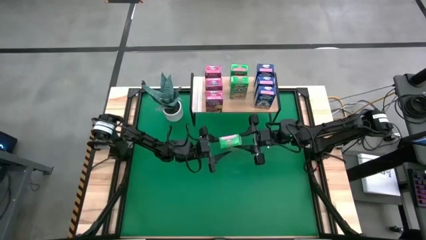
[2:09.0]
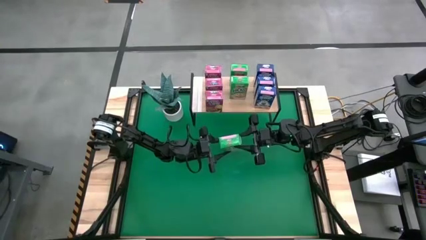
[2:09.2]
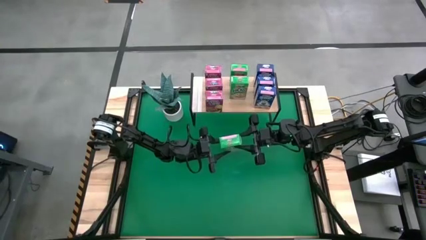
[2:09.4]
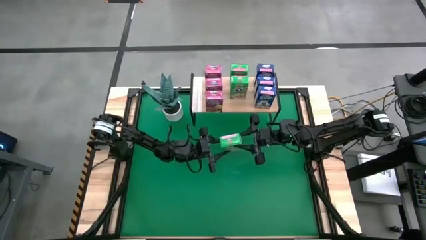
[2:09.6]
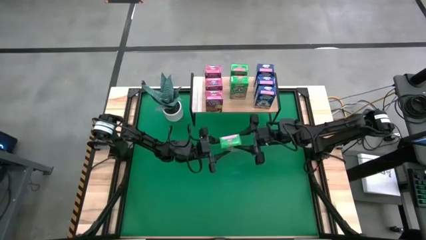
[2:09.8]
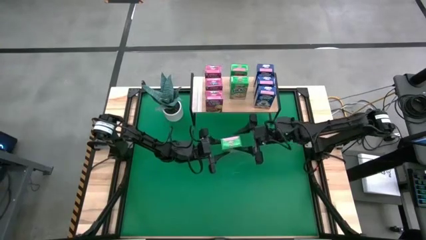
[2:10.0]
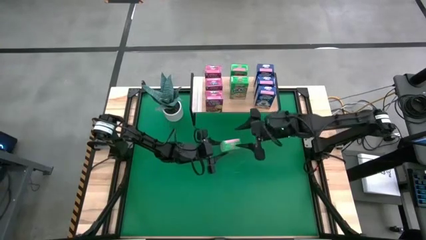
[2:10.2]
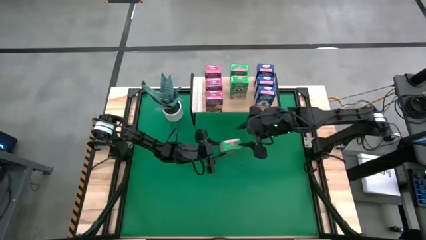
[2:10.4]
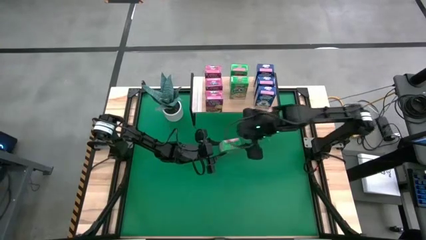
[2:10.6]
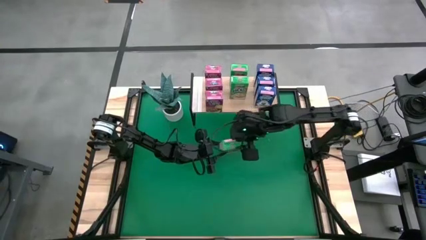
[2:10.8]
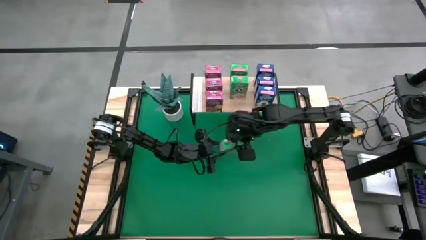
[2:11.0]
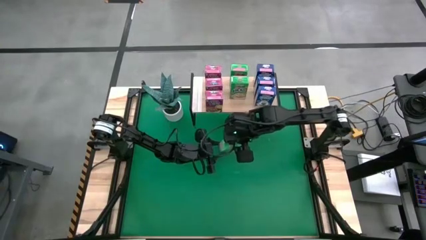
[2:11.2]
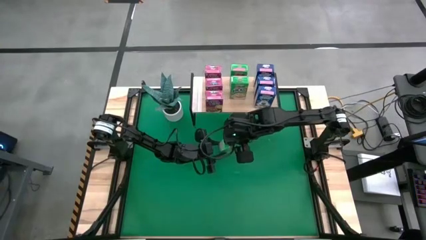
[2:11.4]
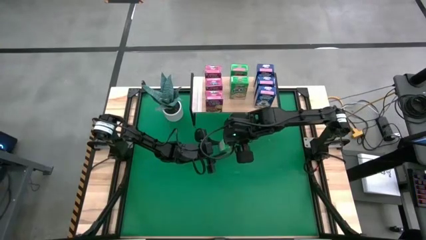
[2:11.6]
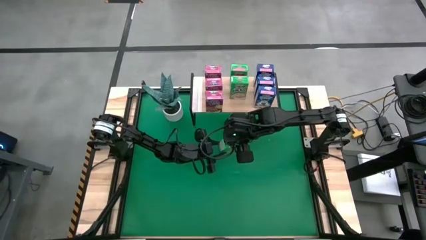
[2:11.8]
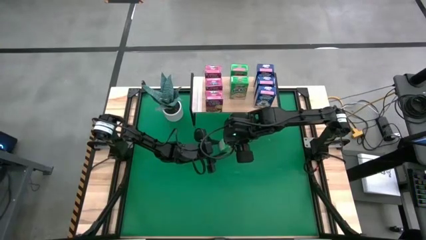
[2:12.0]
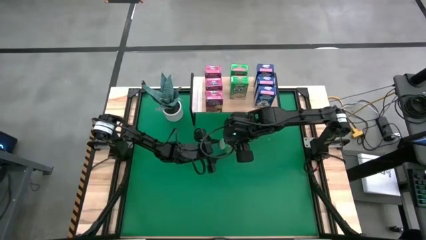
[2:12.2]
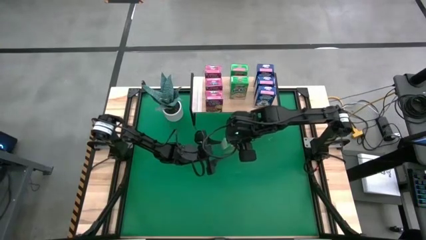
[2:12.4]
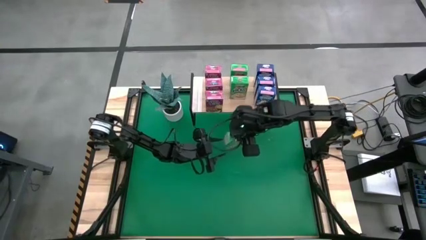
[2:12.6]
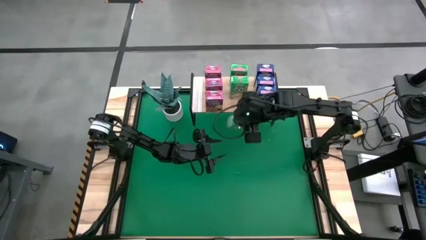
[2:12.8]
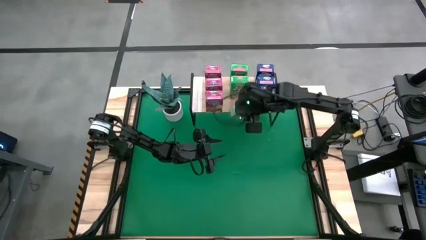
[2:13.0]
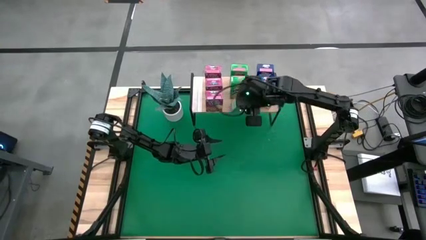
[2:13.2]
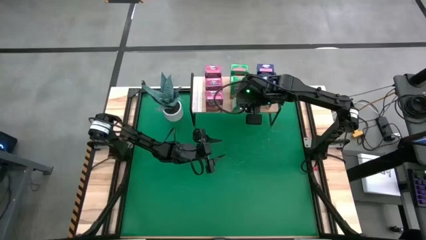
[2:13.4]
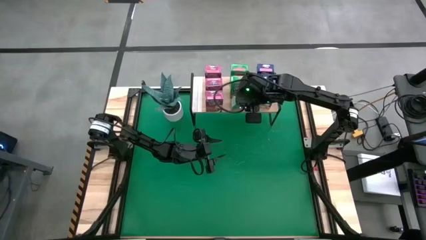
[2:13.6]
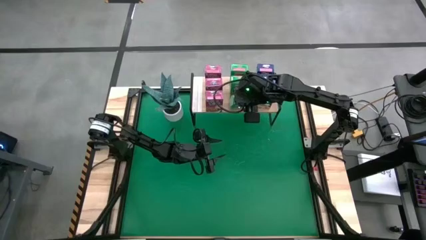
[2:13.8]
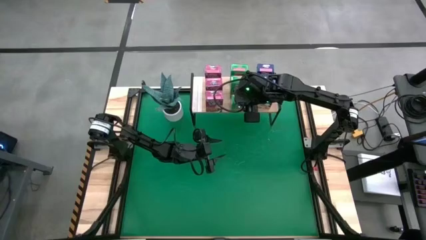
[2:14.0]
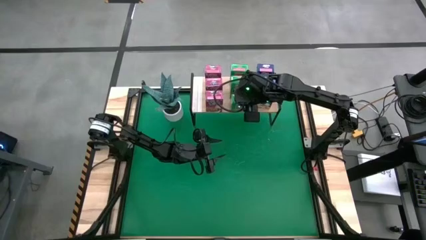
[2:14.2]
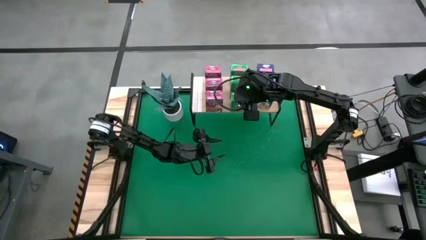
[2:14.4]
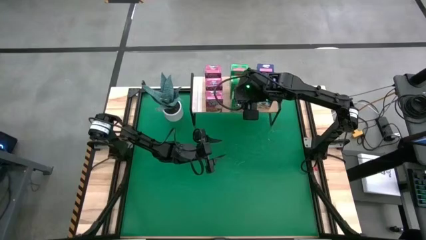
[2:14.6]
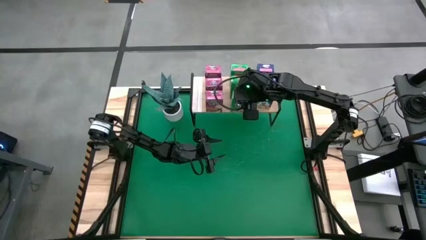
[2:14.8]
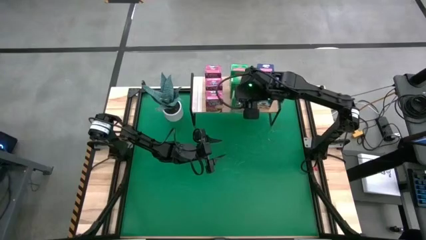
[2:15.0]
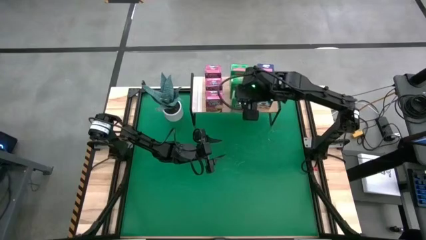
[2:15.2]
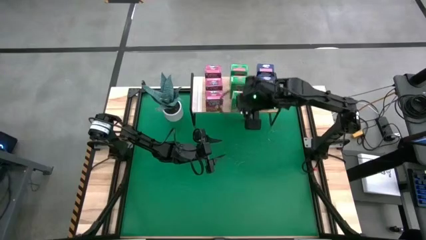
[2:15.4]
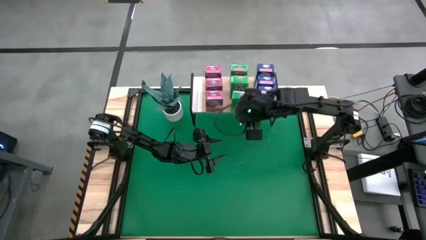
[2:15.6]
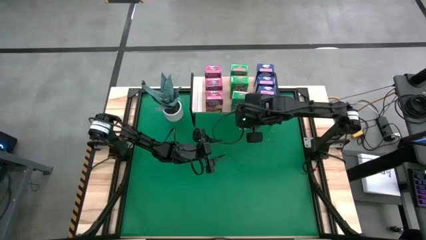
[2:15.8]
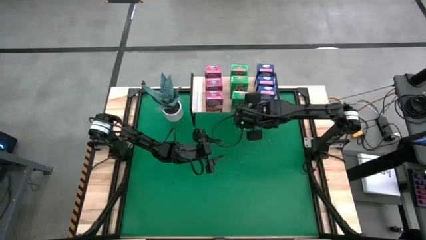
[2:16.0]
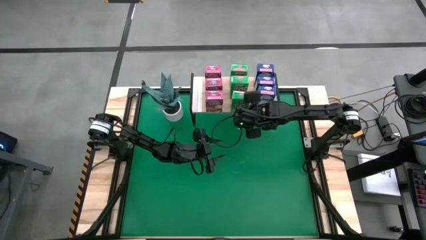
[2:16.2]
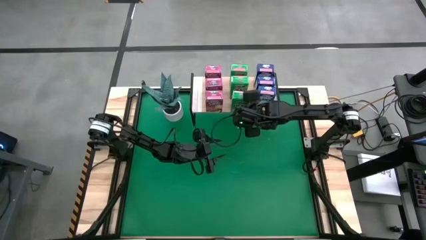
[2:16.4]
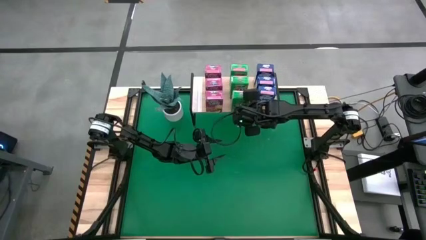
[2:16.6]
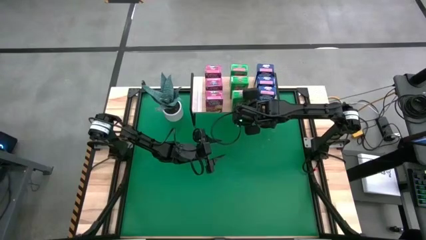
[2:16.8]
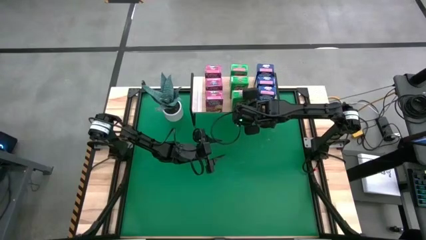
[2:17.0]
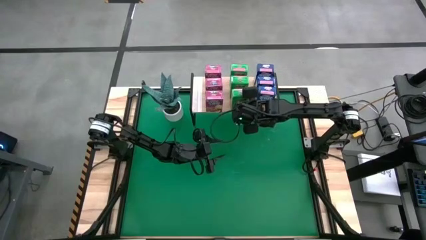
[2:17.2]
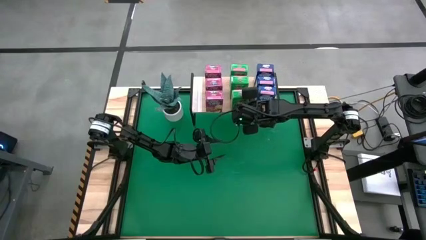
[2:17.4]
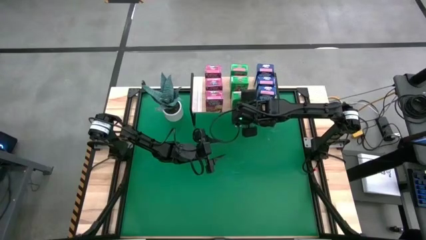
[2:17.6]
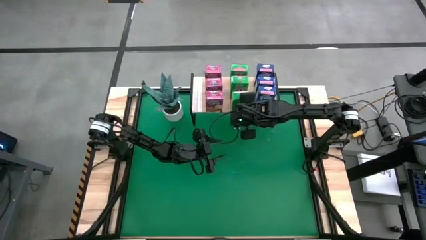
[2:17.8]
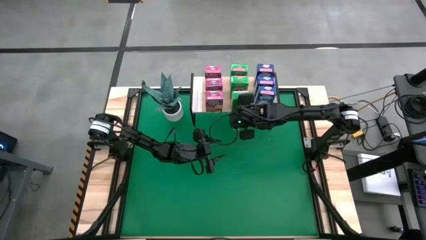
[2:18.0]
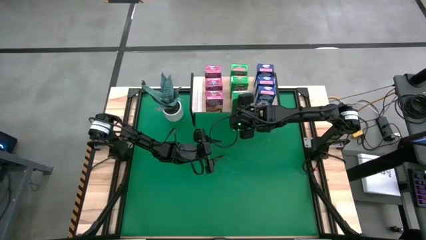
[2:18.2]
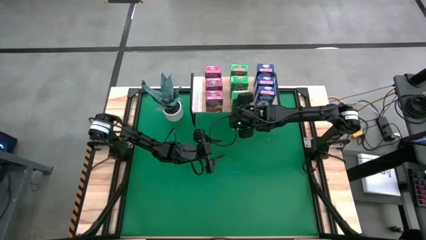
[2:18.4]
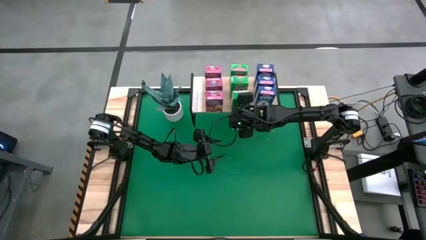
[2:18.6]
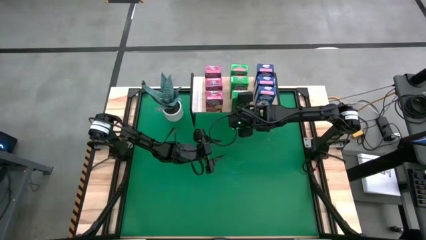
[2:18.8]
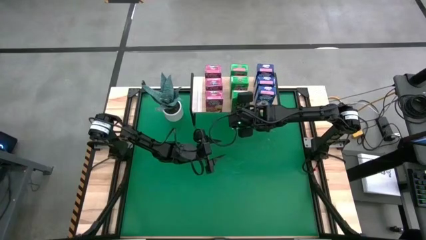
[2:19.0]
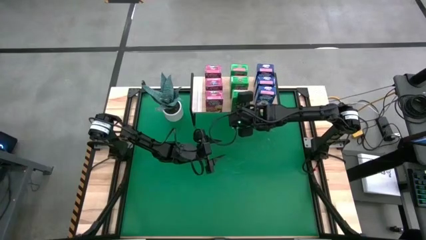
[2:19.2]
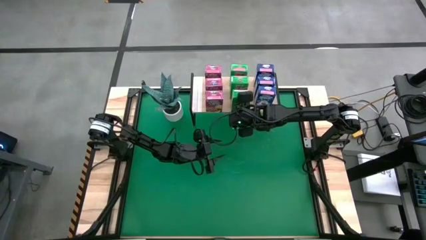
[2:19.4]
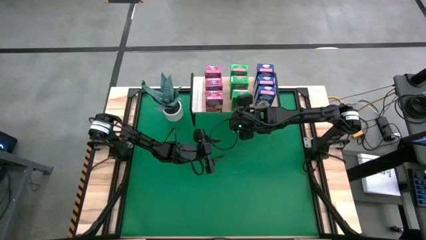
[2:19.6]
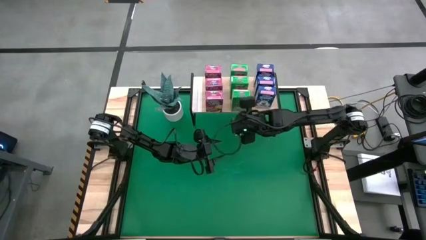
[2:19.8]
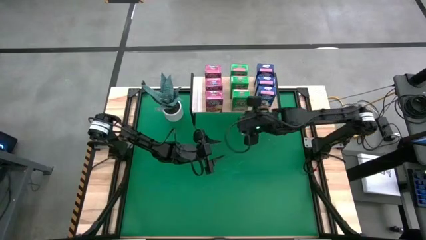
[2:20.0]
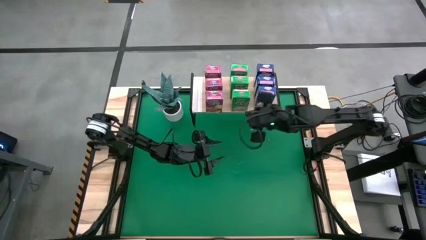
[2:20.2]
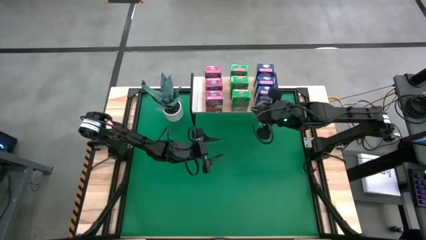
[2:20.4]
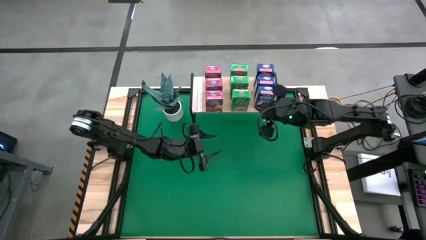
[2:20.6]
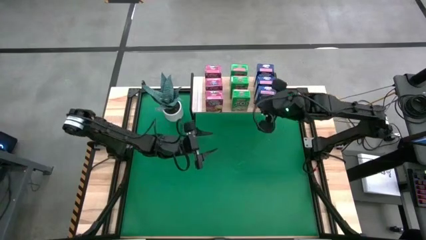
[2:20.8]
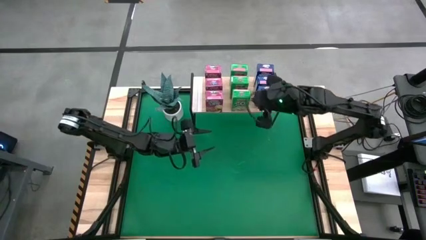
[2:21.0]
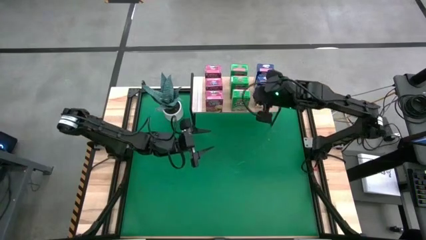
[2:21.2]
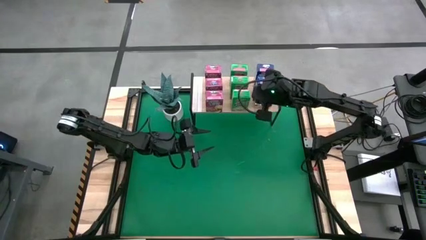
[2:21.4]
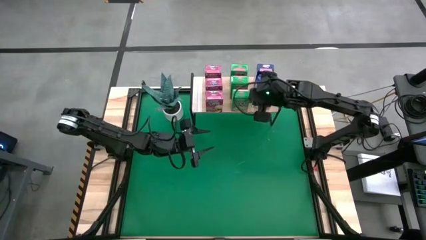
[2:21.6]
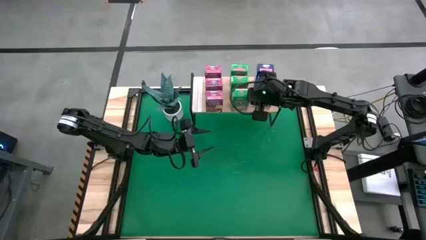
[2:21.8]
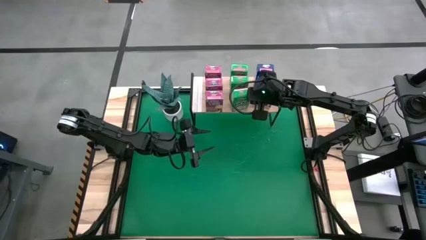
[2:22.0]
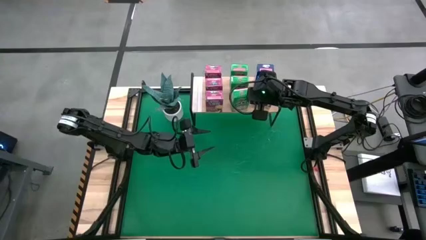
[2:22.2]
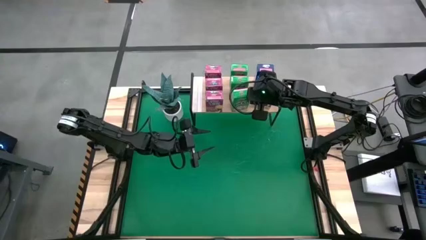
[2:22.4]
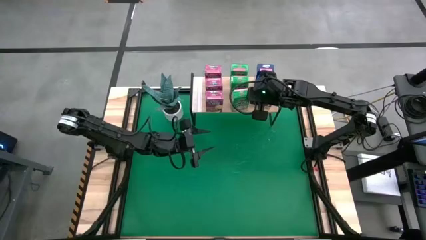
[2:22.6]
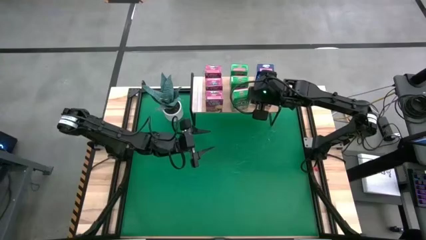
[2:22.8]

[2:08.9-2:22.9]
Task: Stack cereal on shelf
Put the green cereal box aligned with the other green cereal boxes on the shelf
